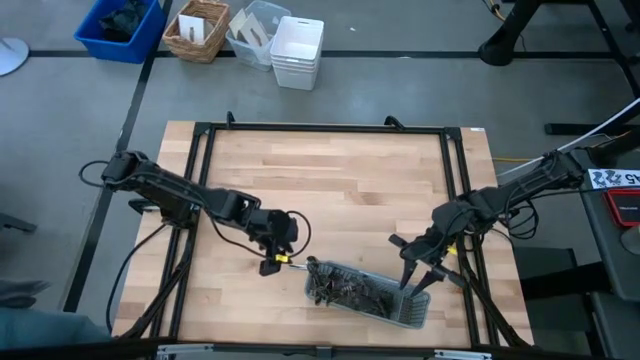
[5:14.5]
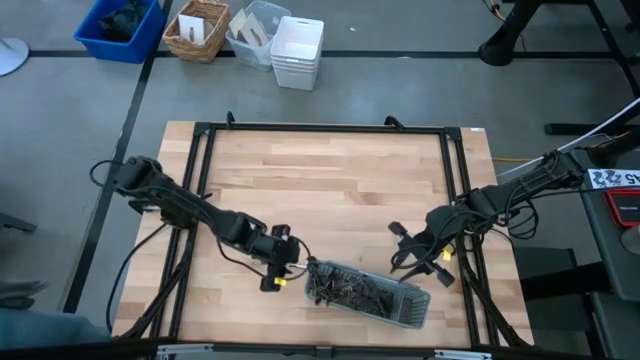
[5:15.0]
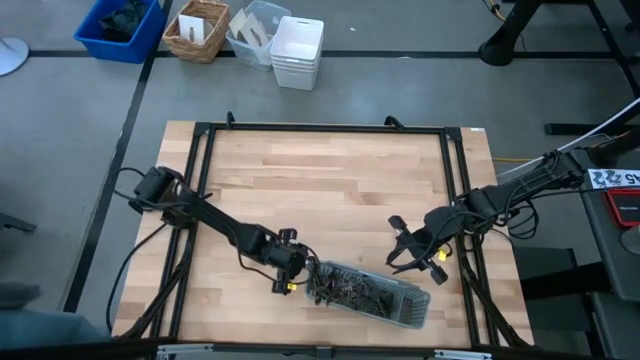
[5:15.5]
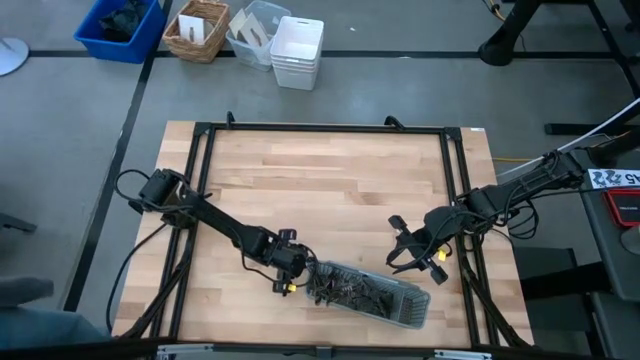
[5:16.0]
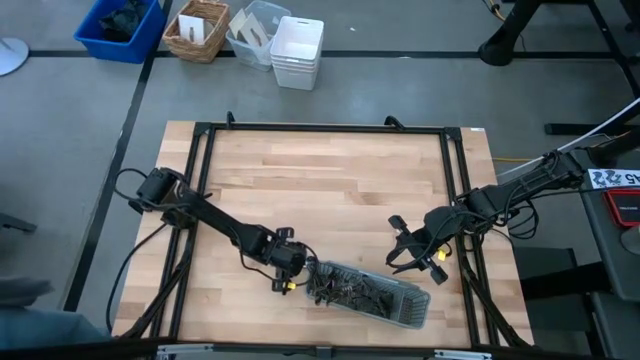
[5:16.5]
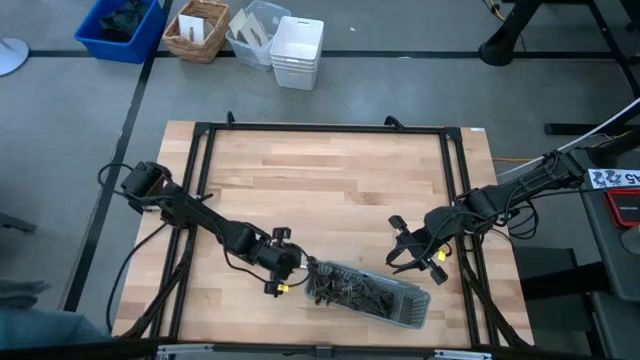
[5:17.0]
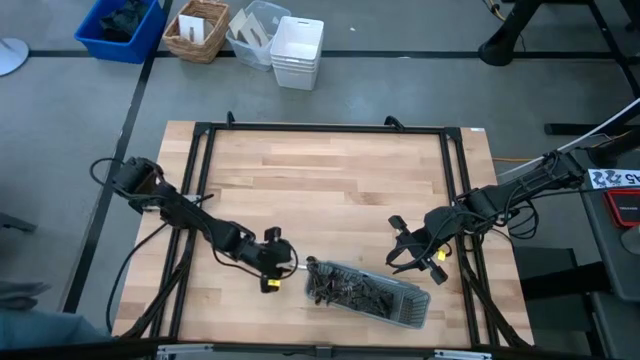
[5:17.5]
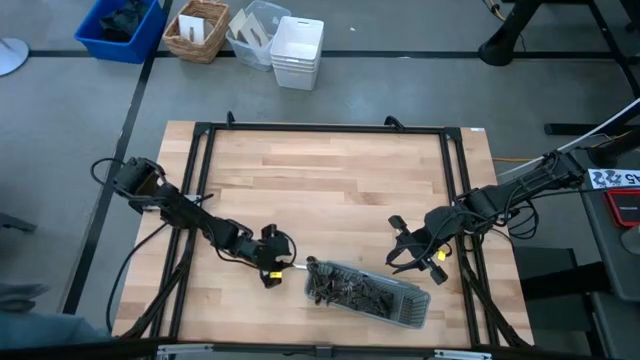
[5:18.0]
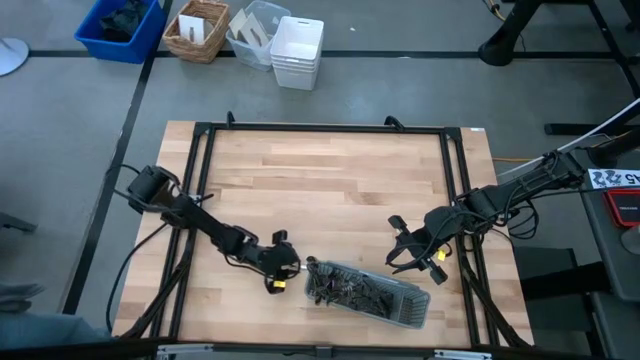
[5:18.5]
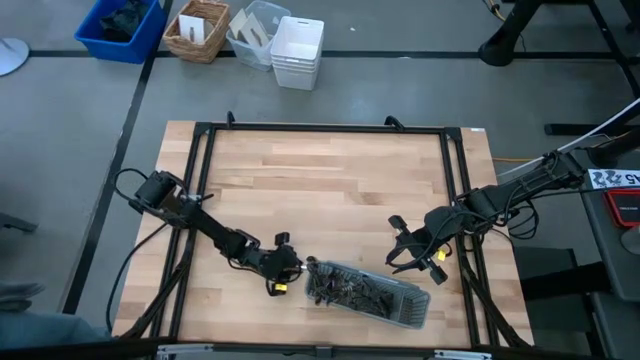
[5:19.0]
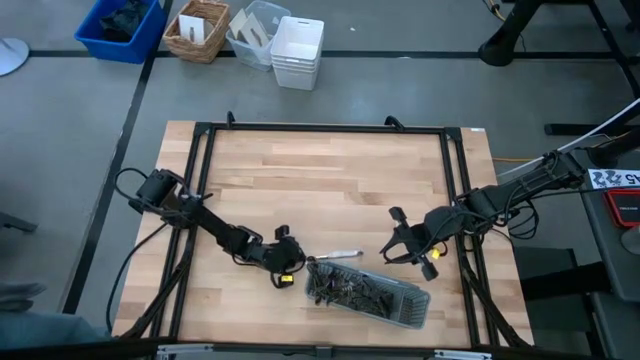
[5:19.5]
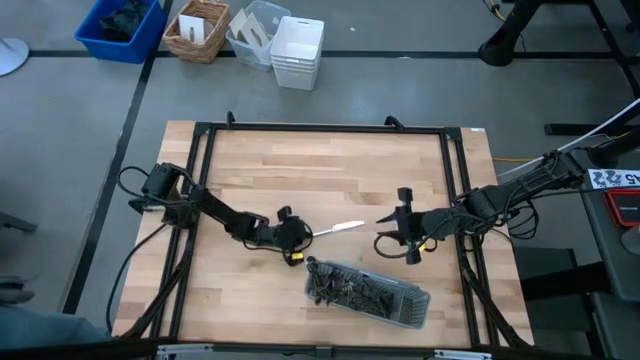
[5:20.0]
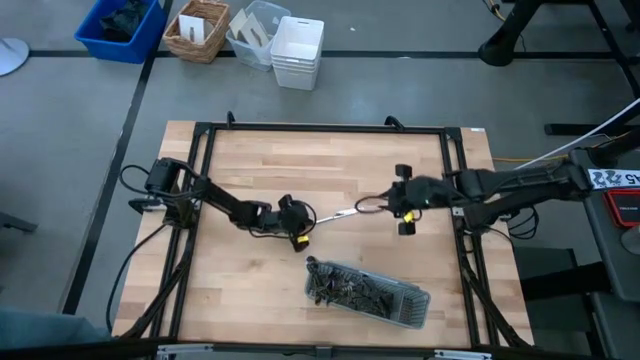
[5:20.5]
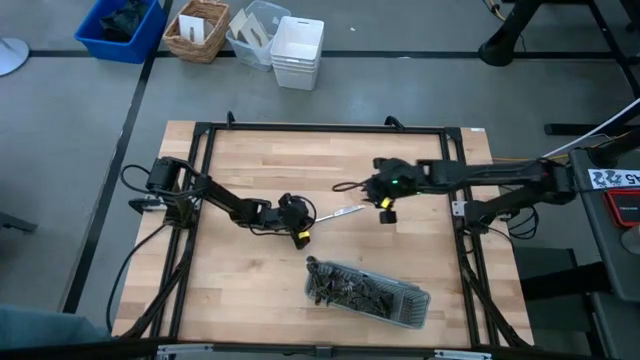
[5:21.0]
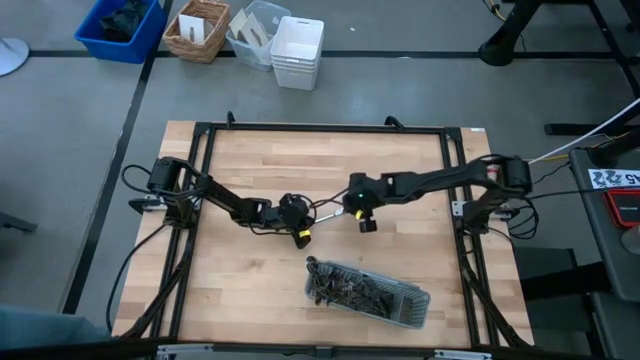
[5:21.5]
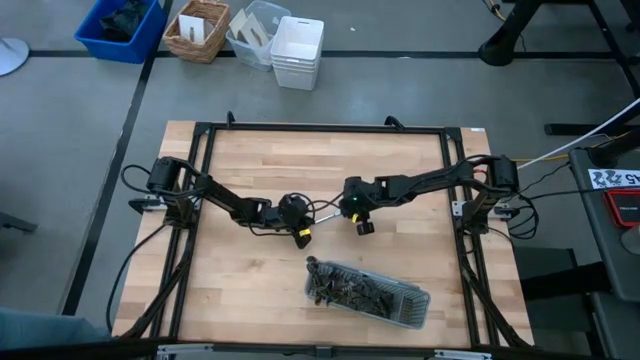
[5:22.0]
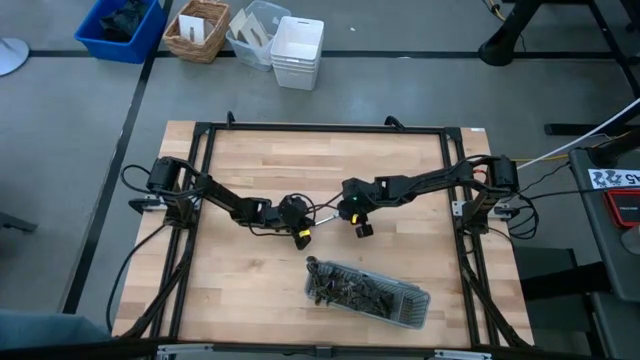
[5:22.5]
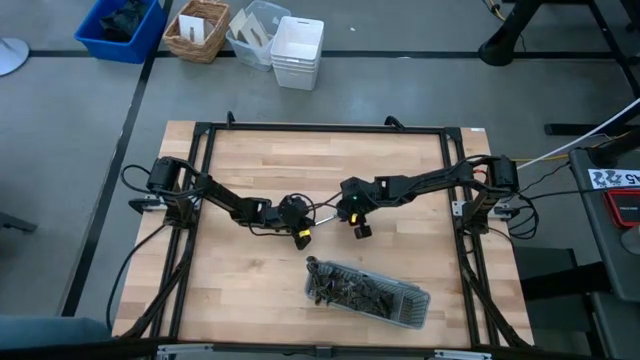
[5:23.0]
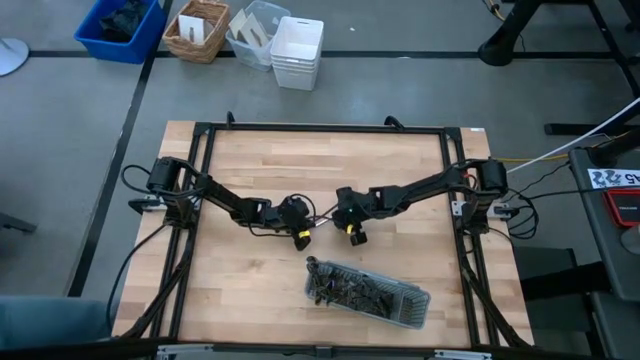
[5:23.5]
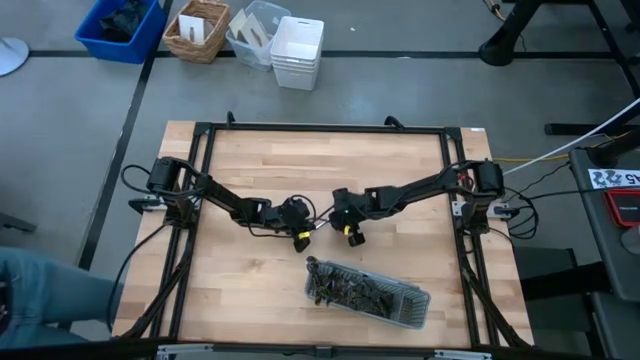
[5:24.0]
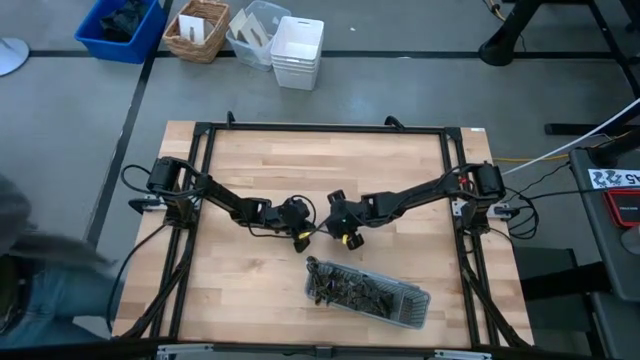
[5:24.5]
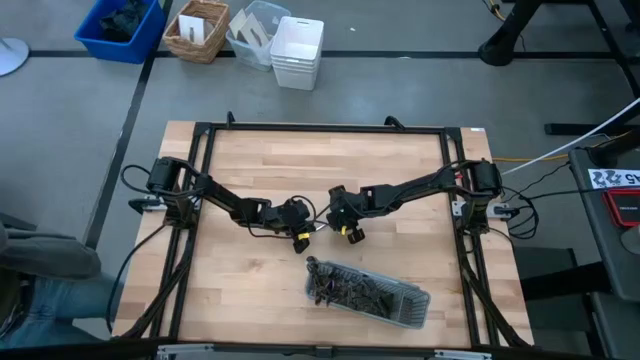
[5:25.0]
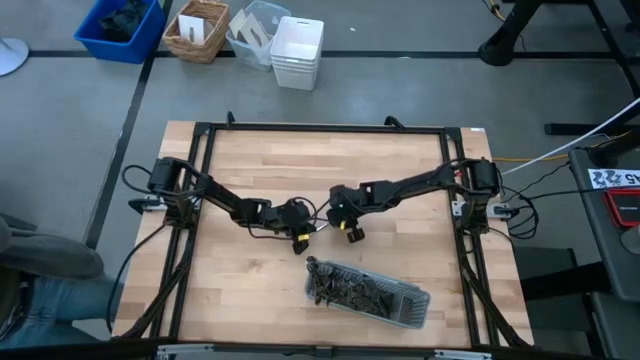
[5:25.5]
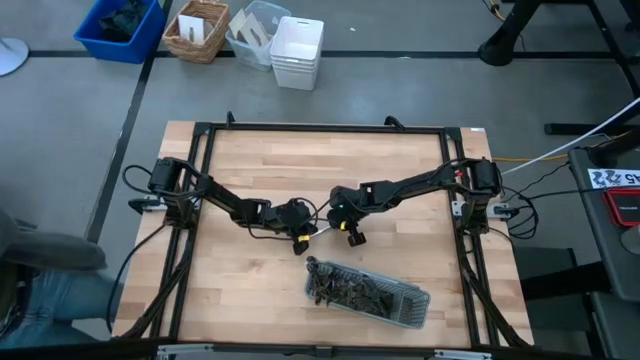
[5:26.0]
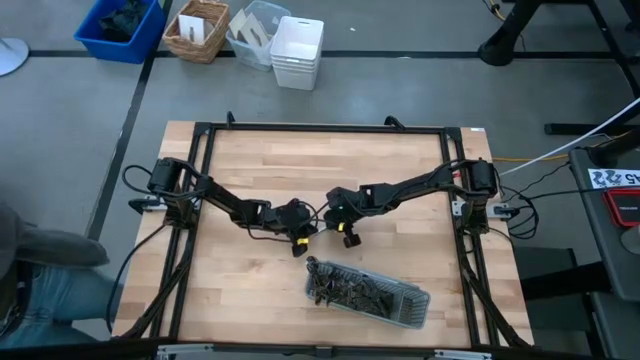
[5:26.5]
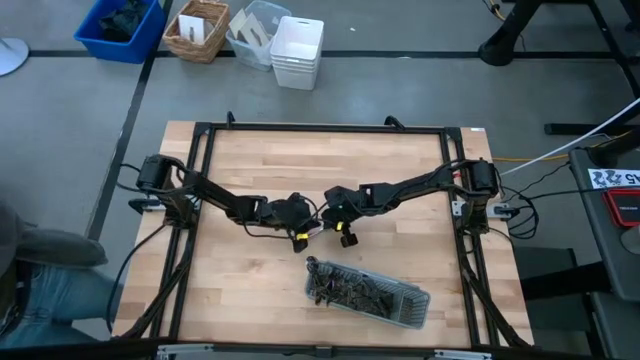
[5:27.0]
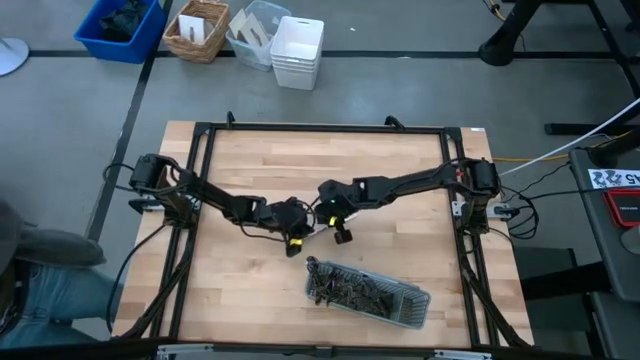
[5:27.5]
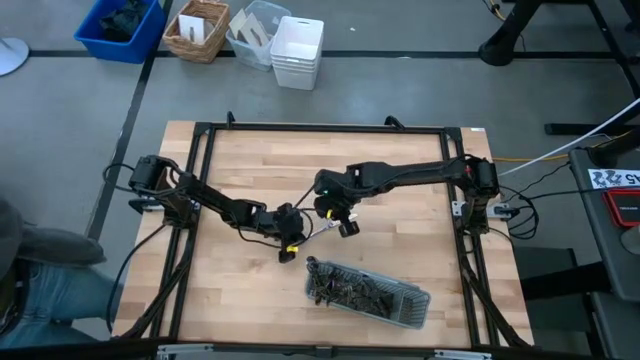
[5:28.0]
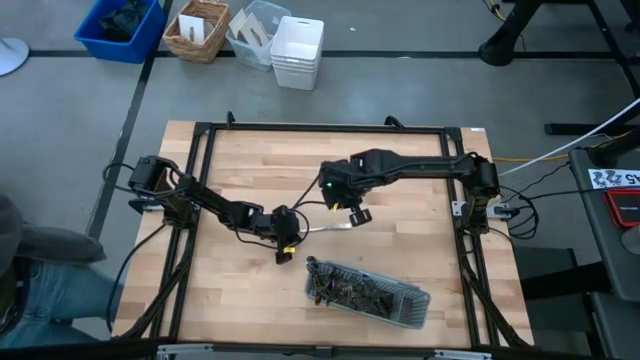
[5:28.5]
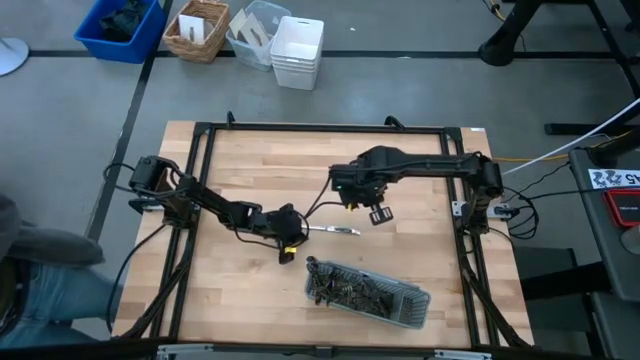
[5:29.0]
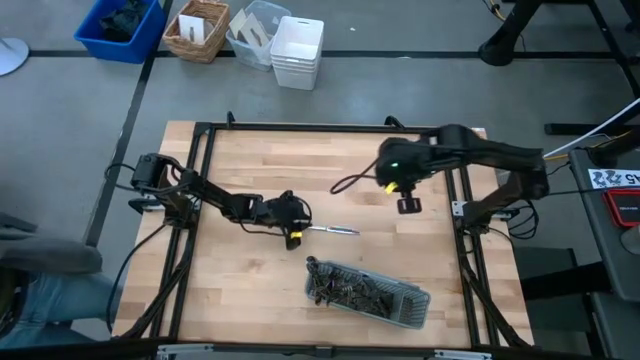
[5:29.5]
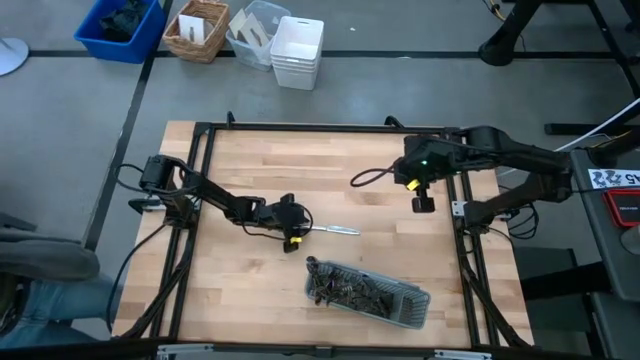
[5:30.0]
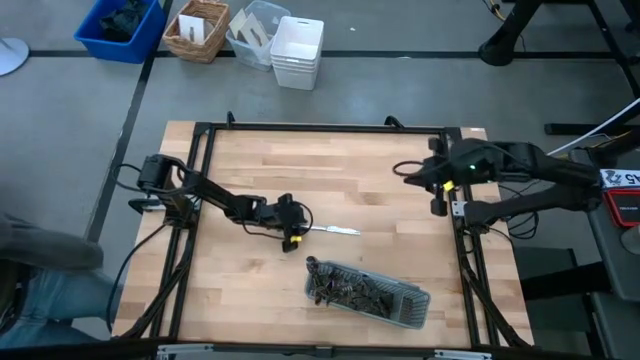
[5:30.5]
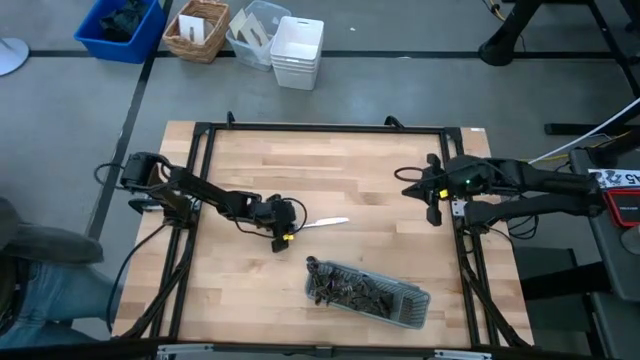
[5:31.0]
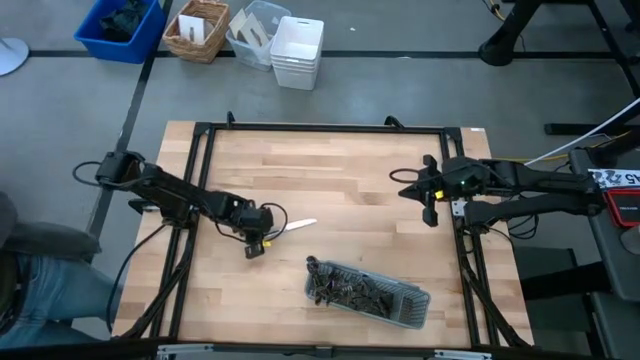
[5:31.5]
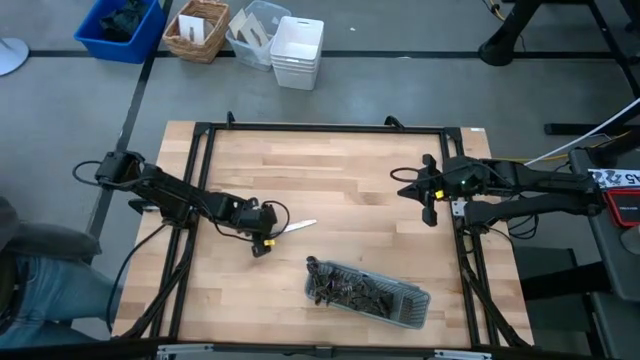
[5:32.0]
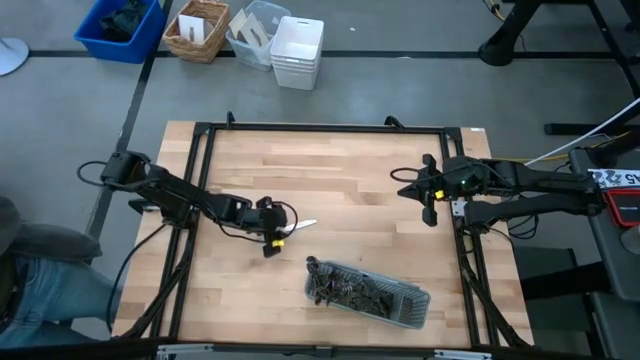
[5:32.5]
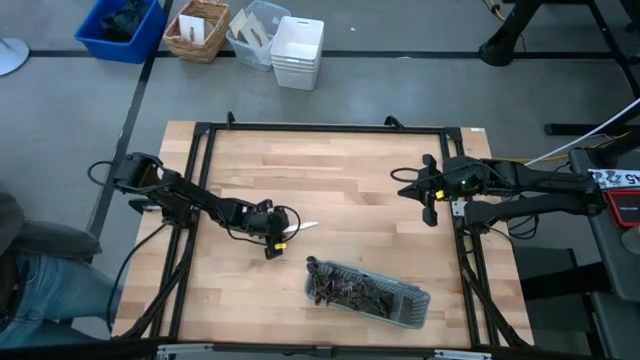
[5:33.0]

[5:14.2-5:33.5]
Task: Sort silverware
Put the knife into the gray silverware rack

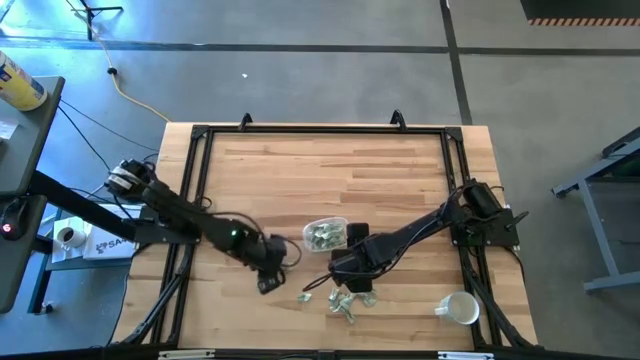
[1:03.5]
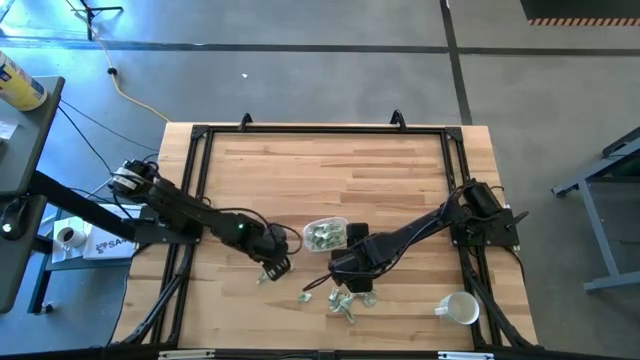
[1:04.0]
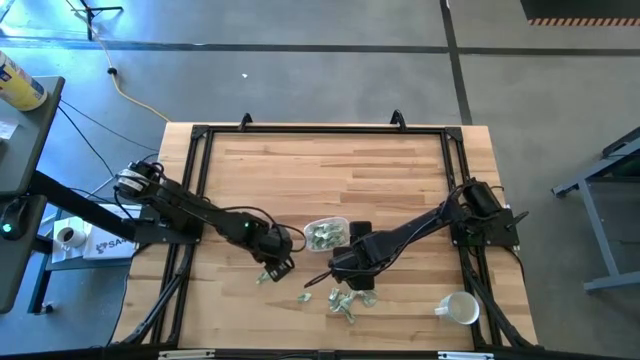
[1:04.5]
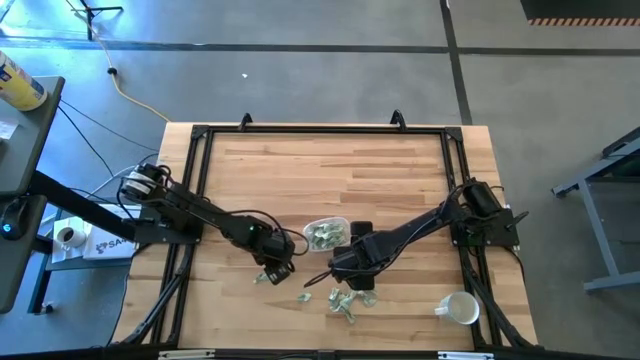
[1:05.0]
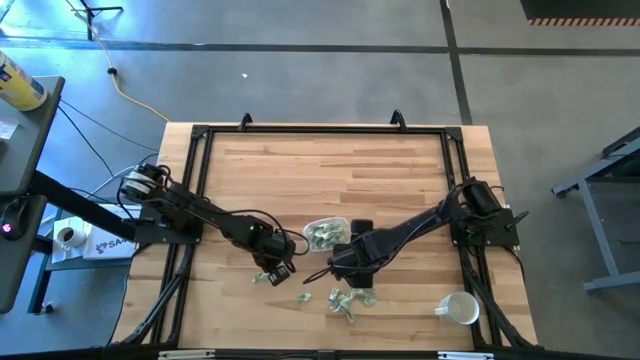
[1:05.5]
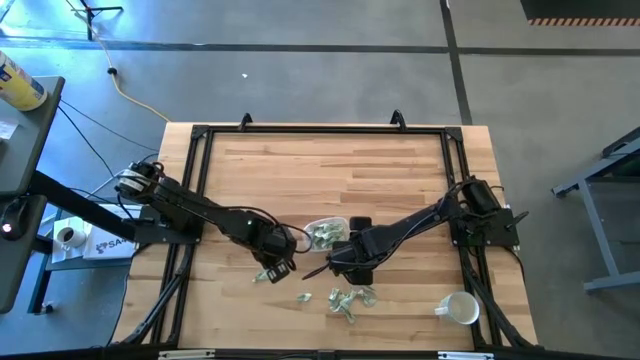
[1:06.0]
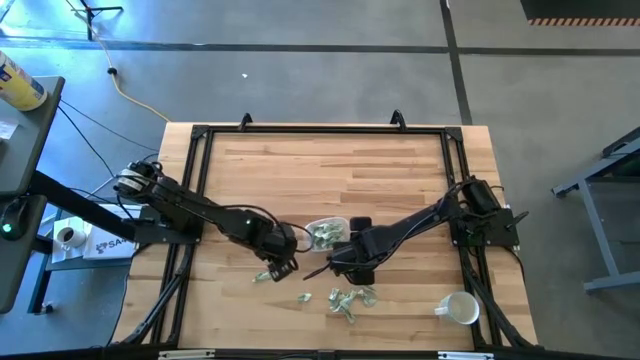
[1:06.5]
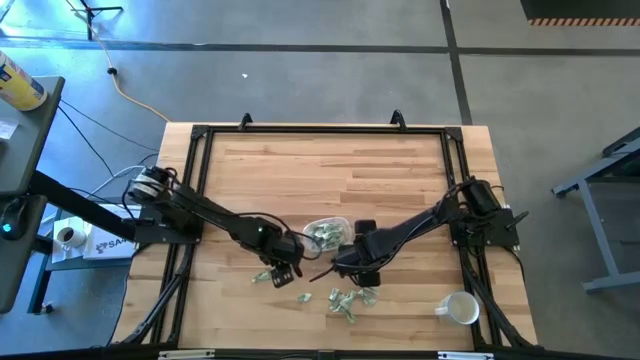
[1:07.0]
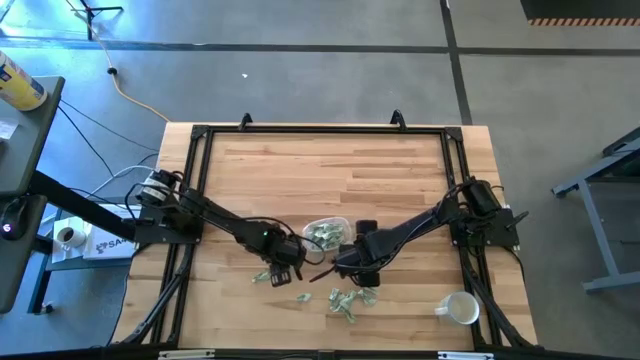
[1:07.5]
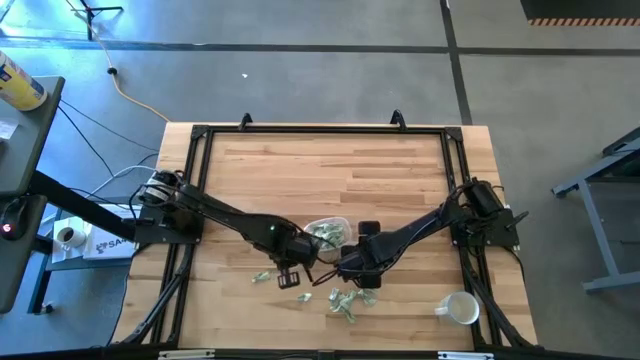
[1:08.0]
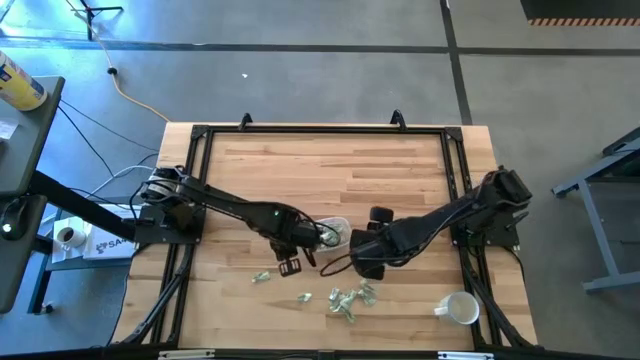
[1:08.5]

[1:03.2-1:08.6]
Task: Pick and place Stevia / Truvia into bins
Put the green stevia packet into the transparent bin
